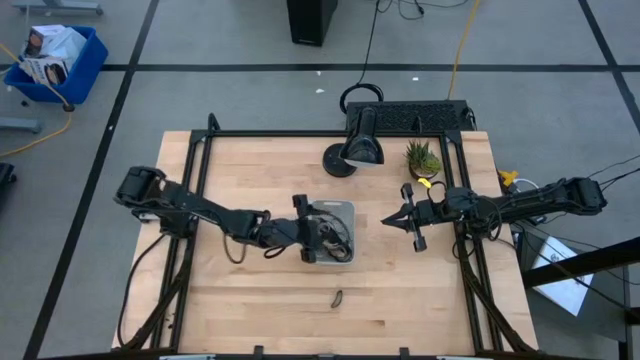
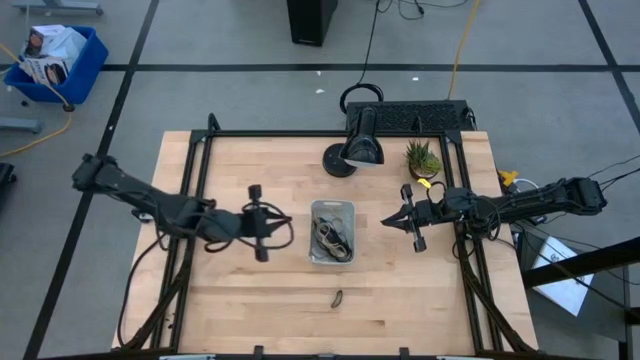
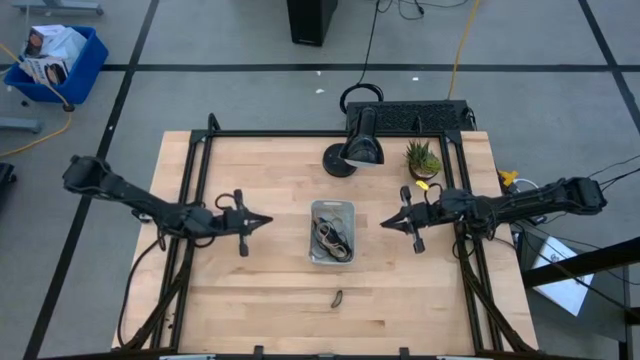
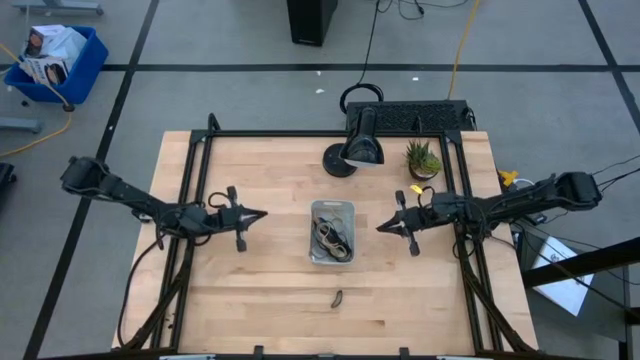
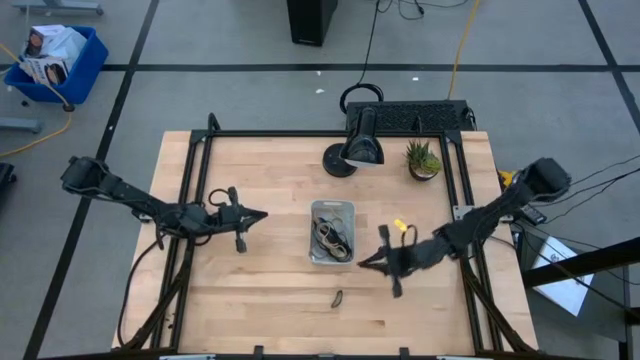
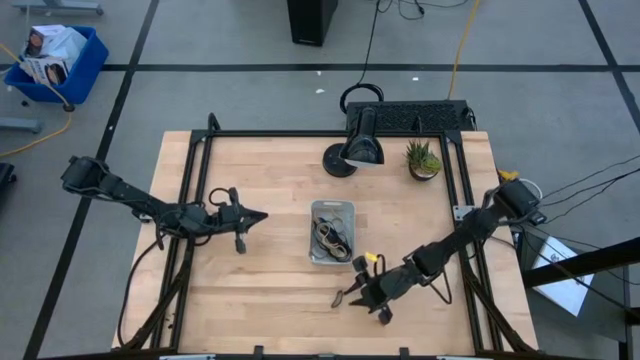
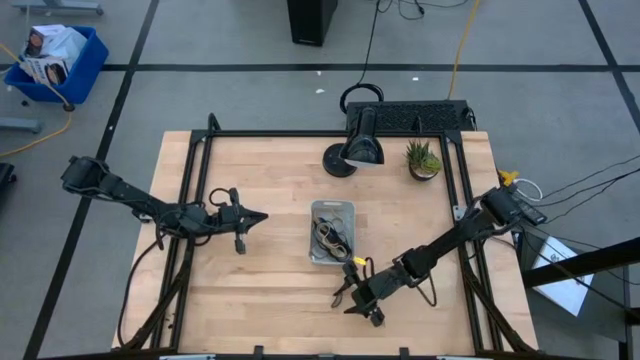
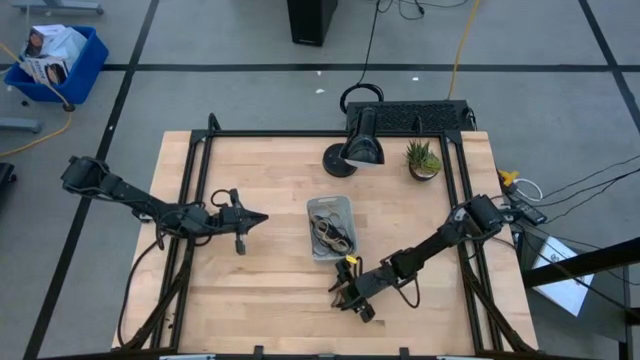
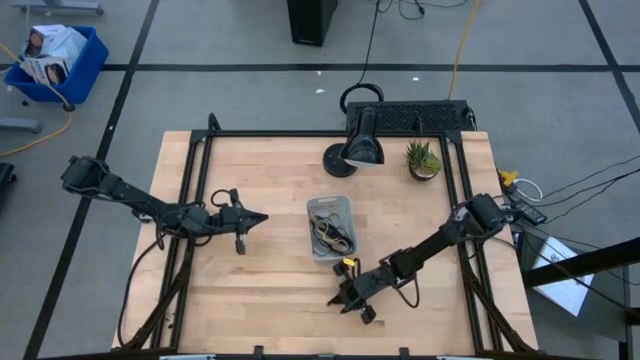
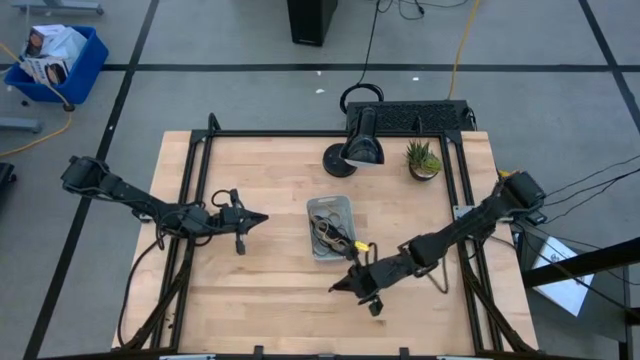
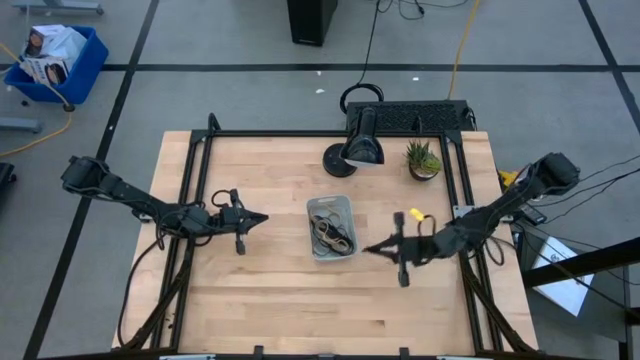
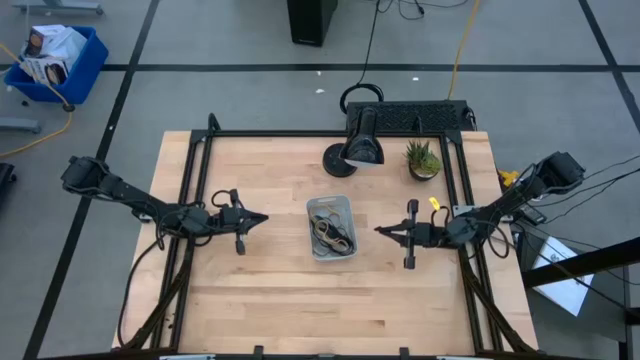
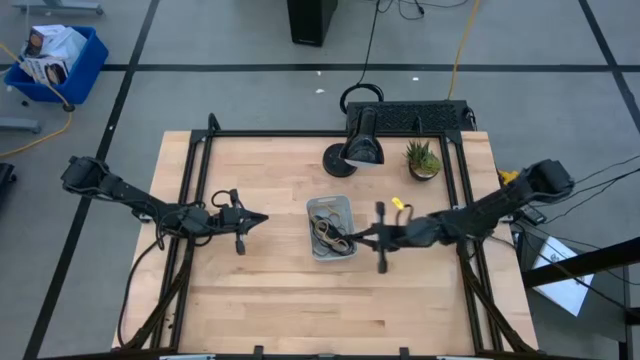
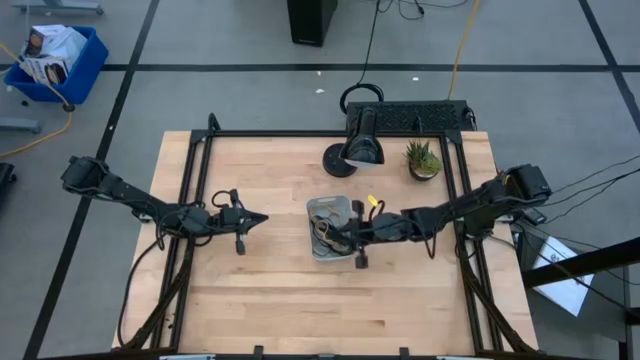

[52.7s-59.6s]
Task: Pick and place rubber bands into bin
Put the black rubber band into the gray bin

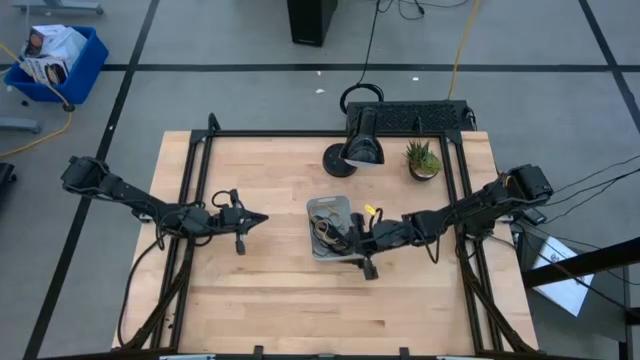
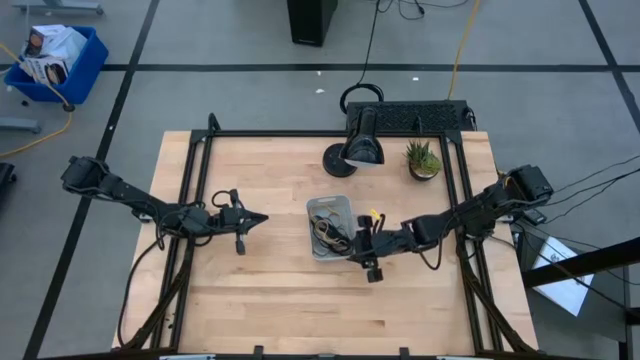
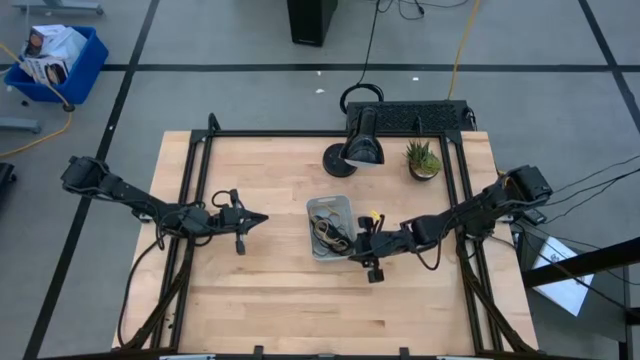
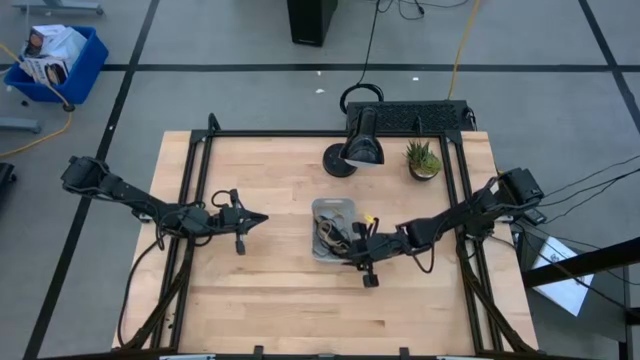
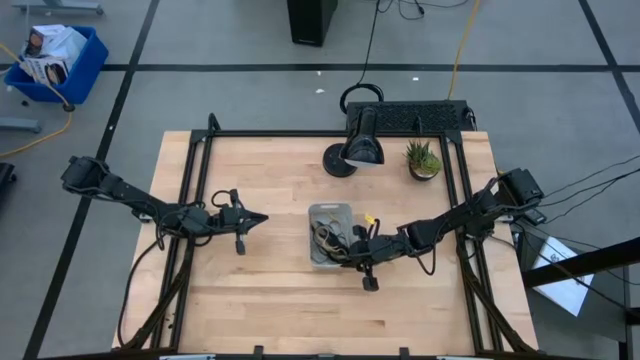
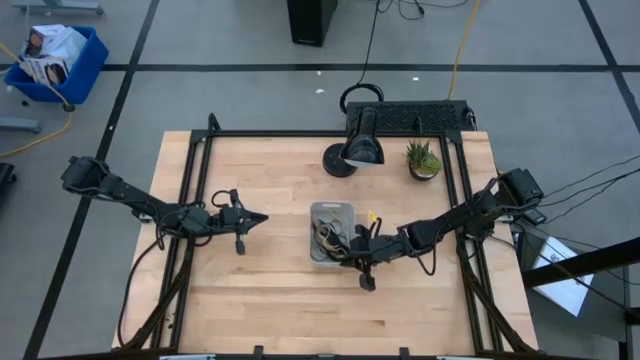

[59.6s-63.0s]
Adjust the gray bin

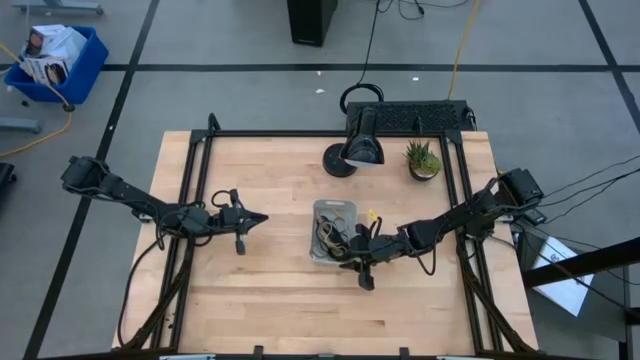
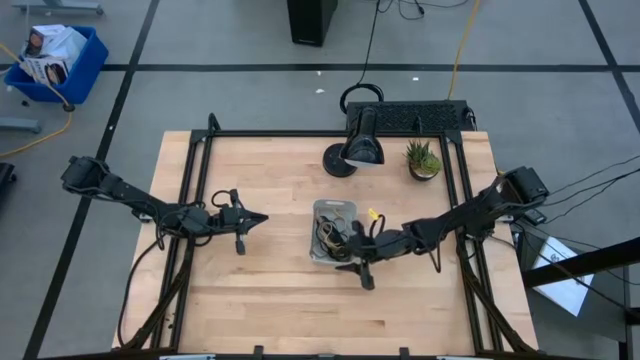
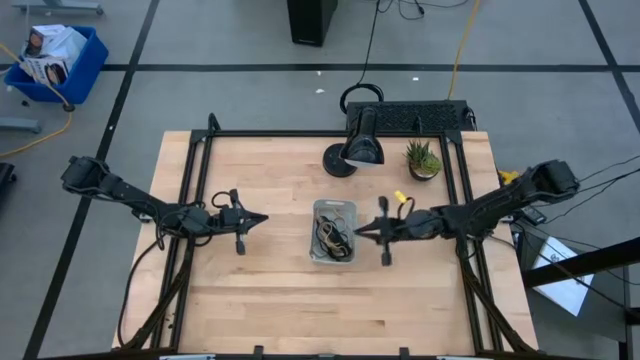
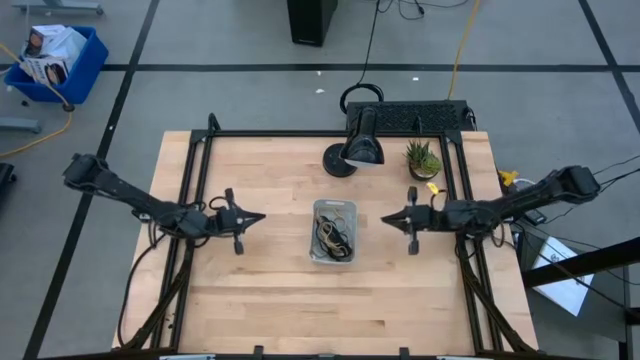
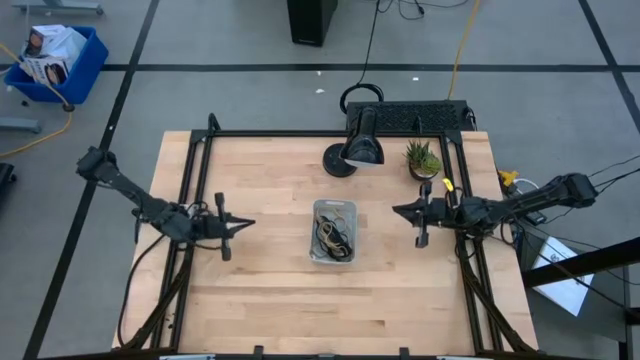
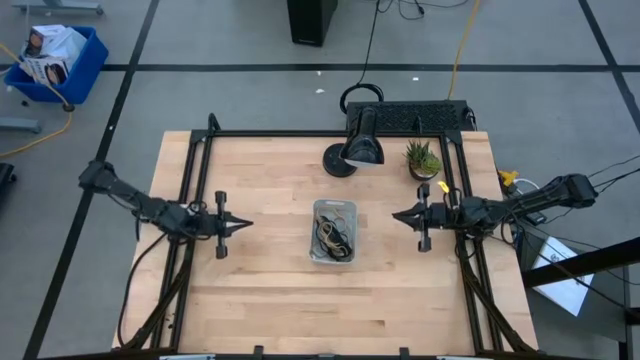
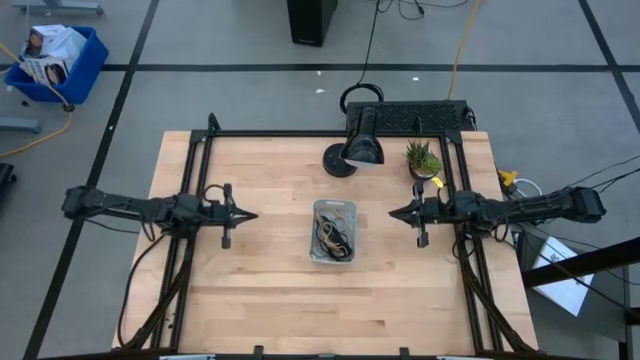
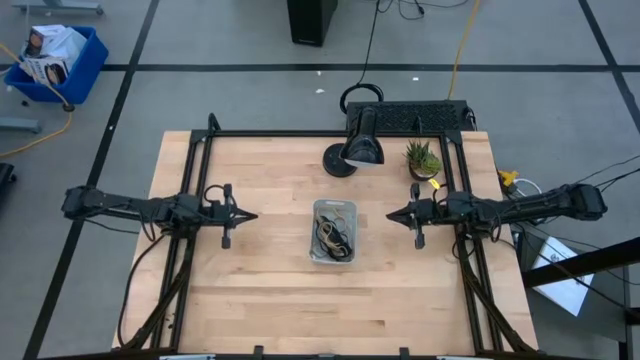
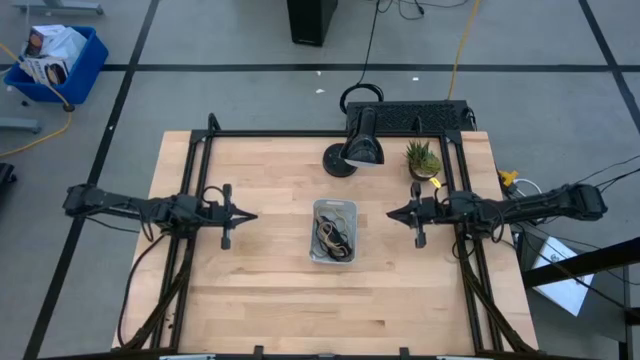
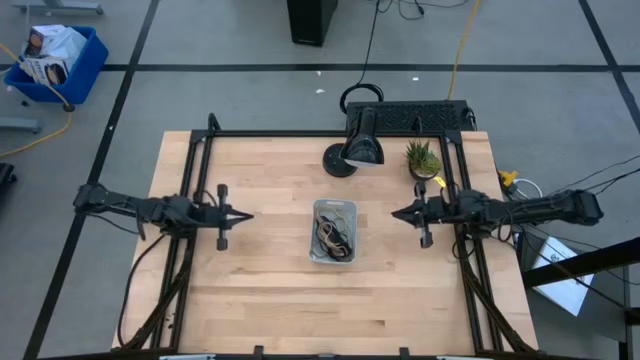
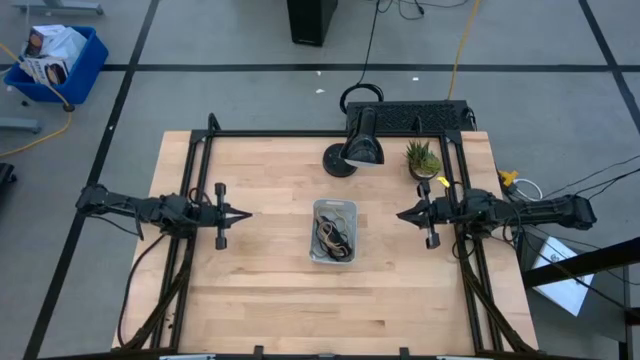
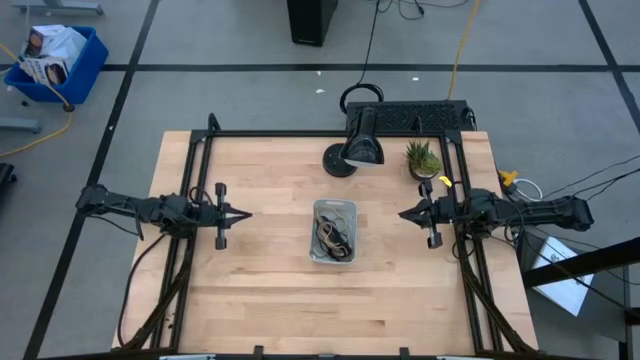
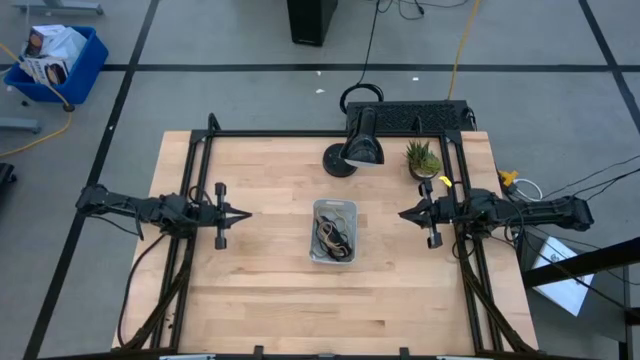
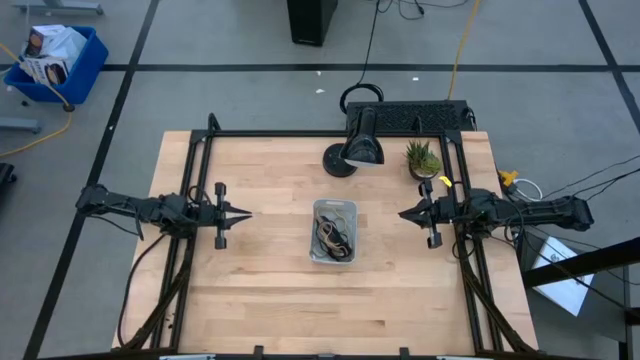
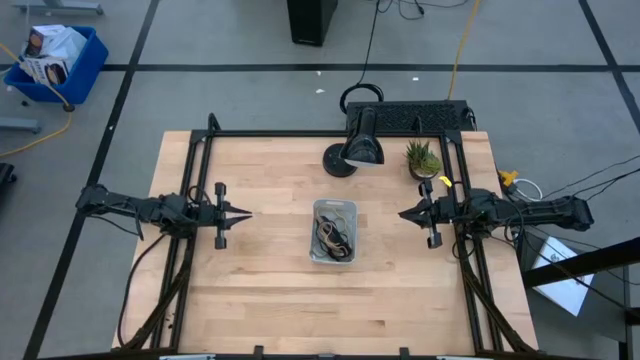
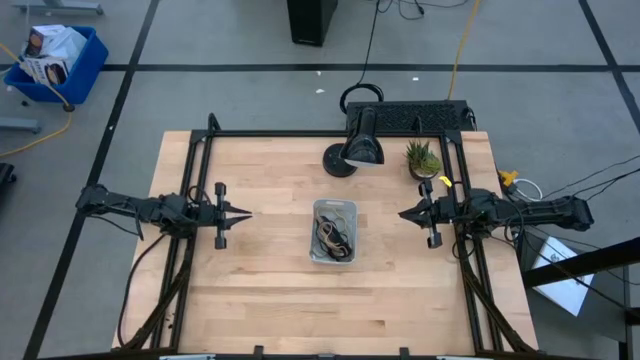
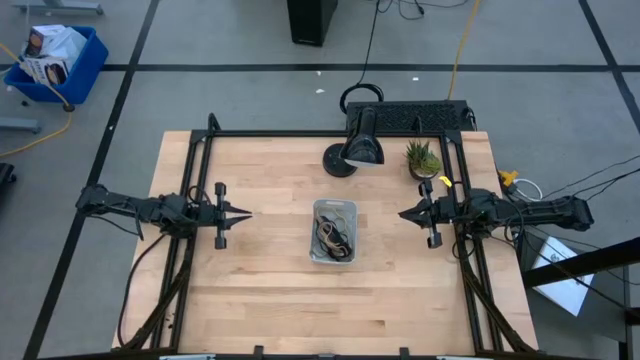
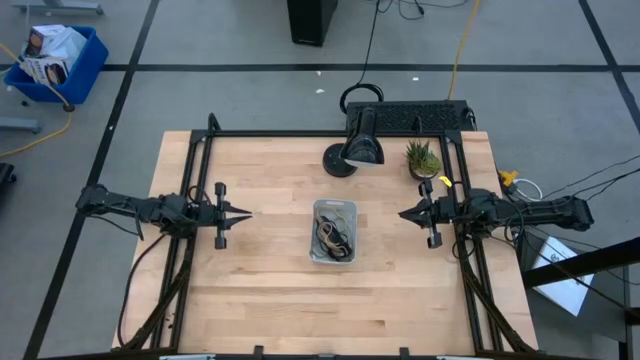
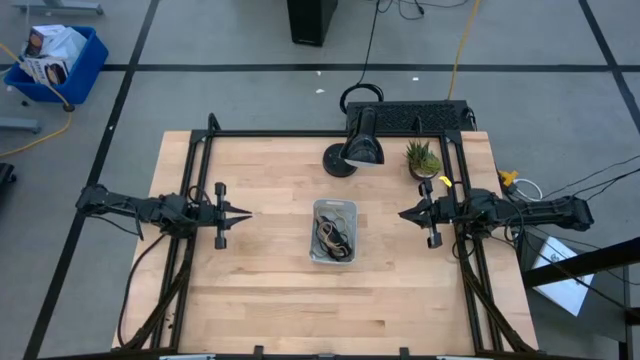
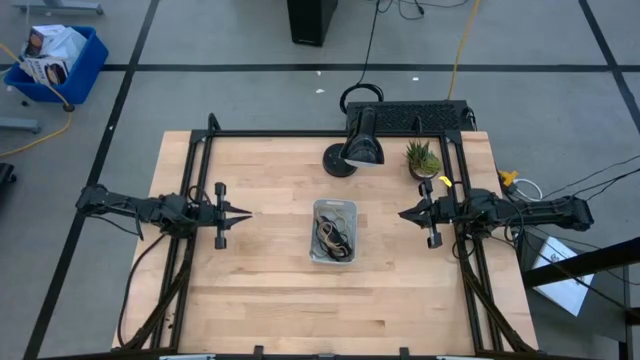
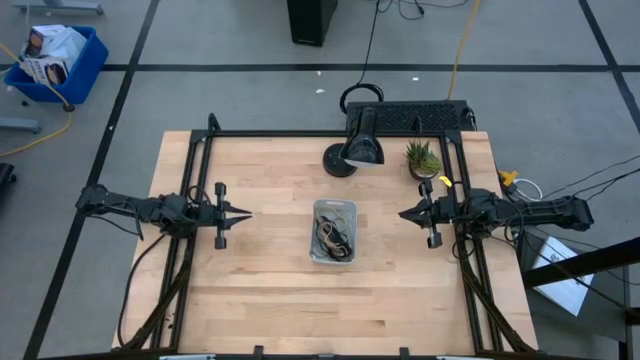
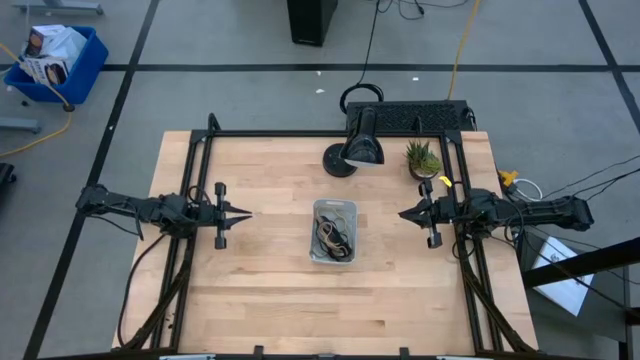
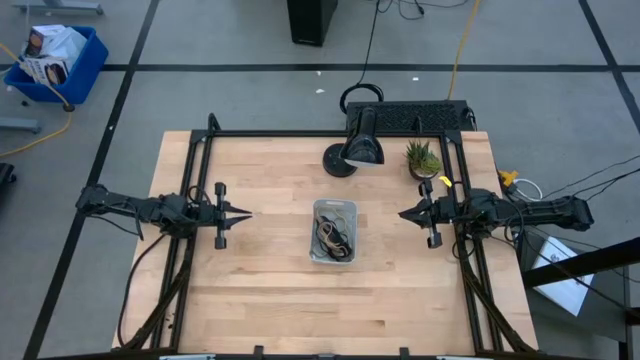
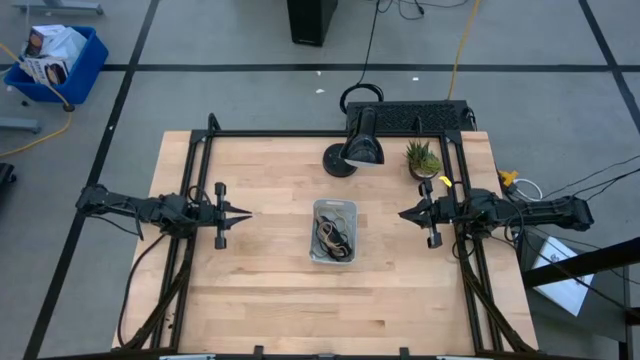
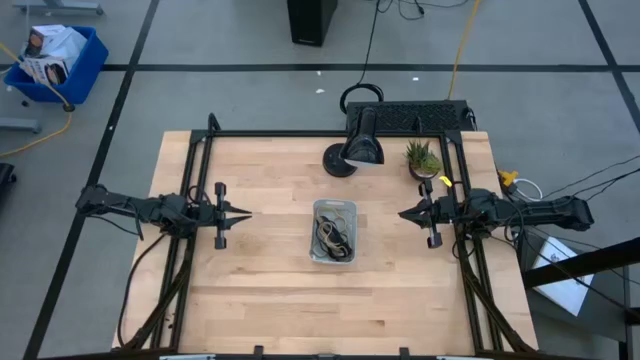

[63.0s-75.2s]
Return to Home Position
